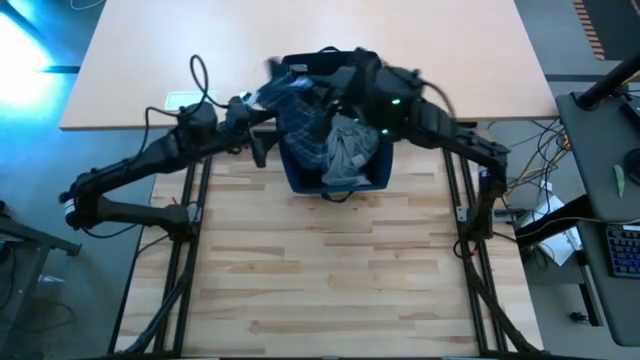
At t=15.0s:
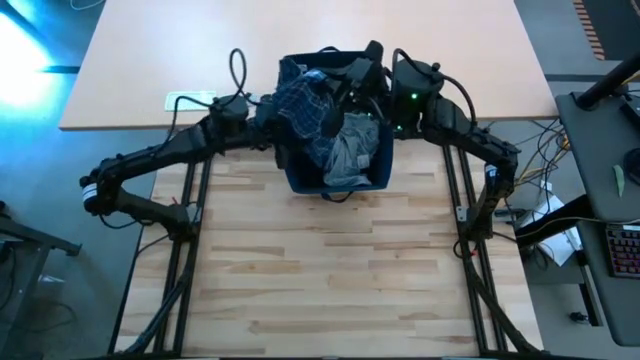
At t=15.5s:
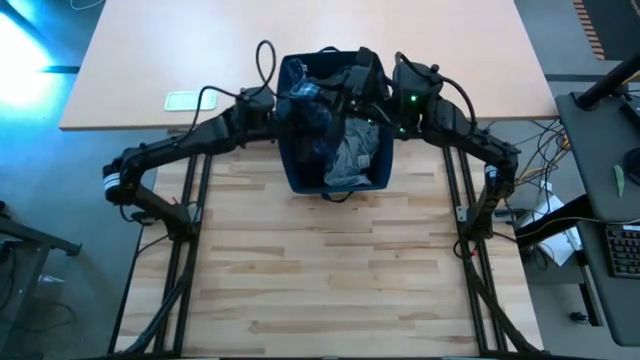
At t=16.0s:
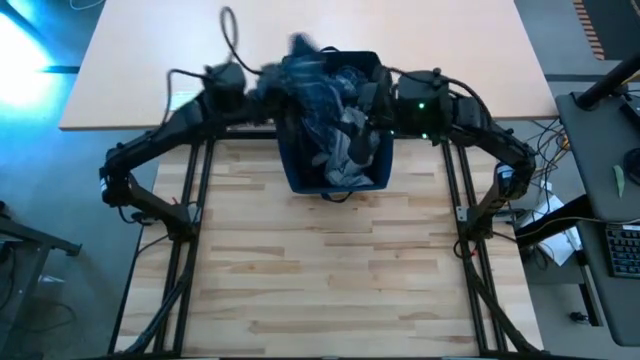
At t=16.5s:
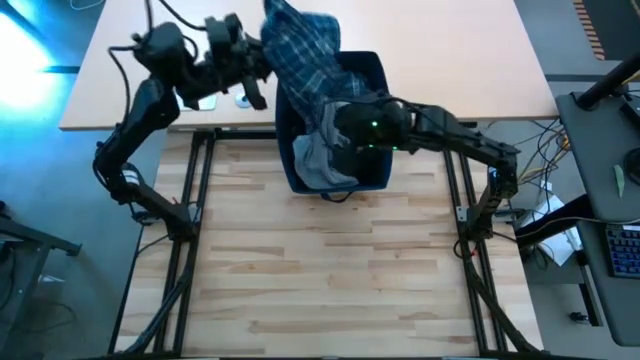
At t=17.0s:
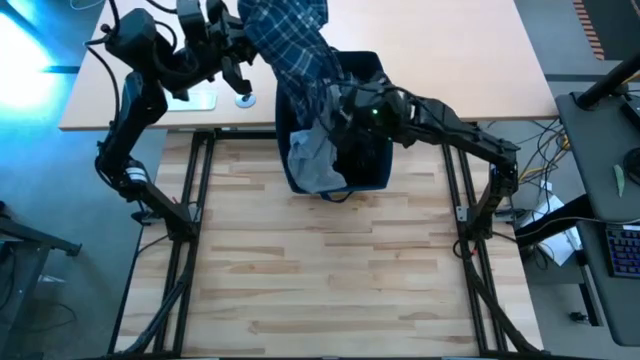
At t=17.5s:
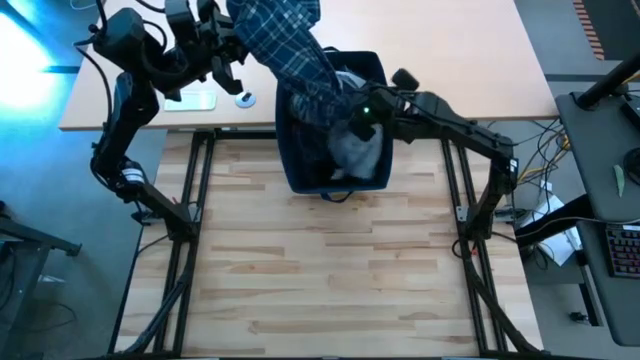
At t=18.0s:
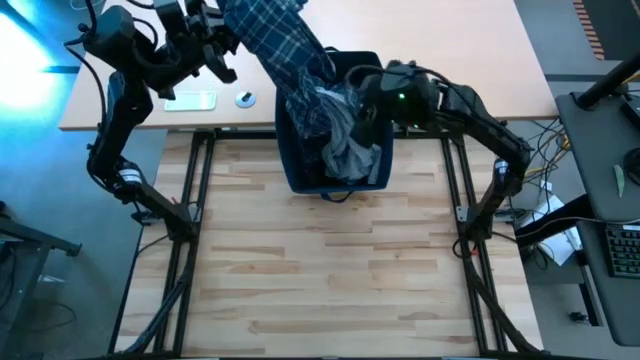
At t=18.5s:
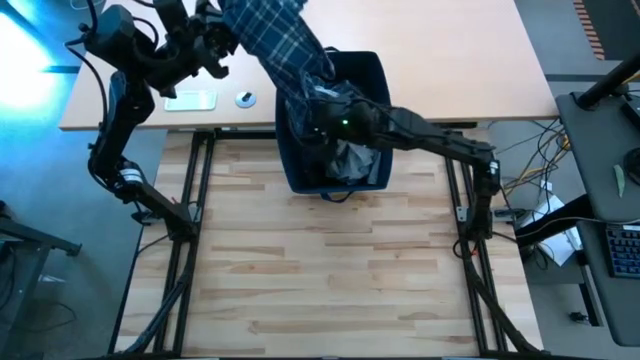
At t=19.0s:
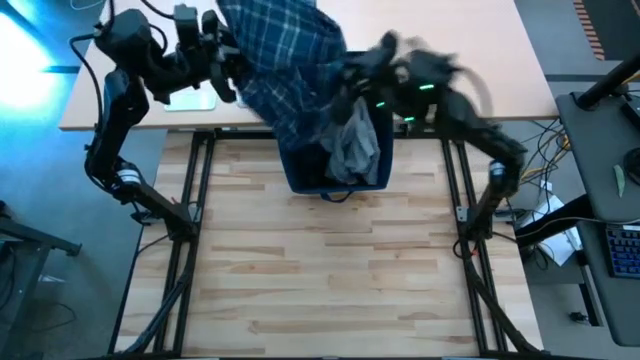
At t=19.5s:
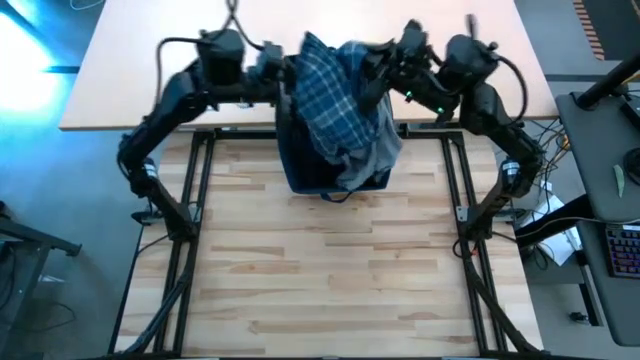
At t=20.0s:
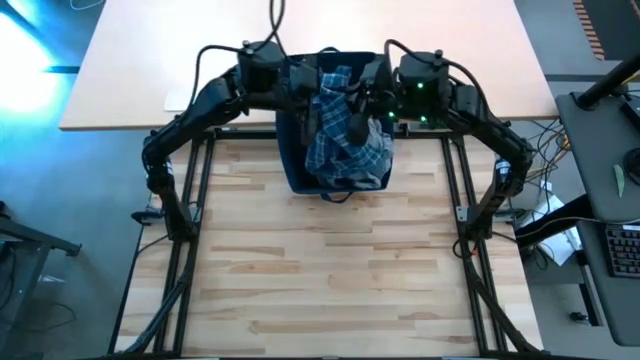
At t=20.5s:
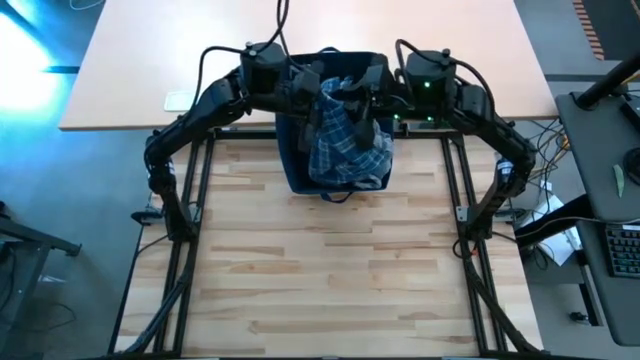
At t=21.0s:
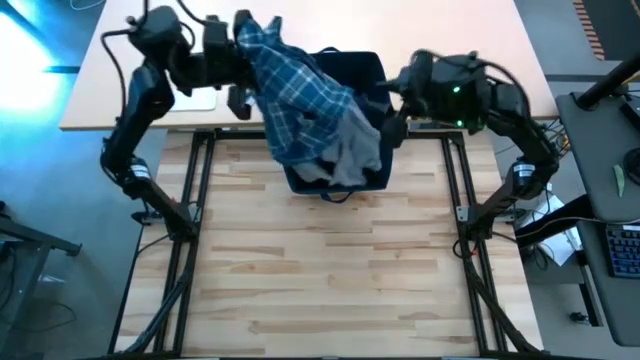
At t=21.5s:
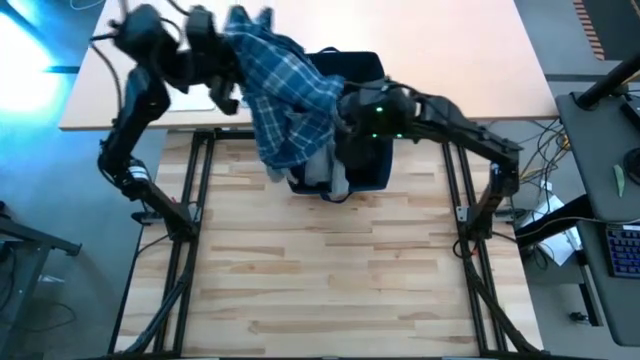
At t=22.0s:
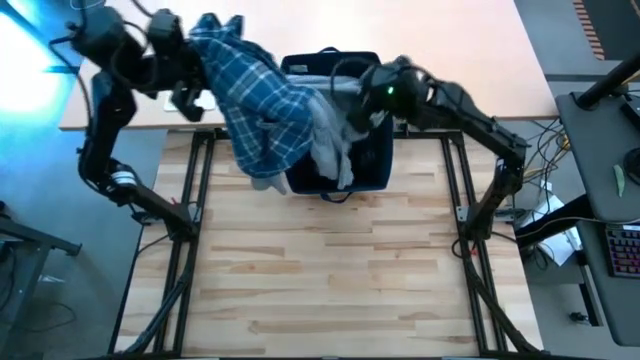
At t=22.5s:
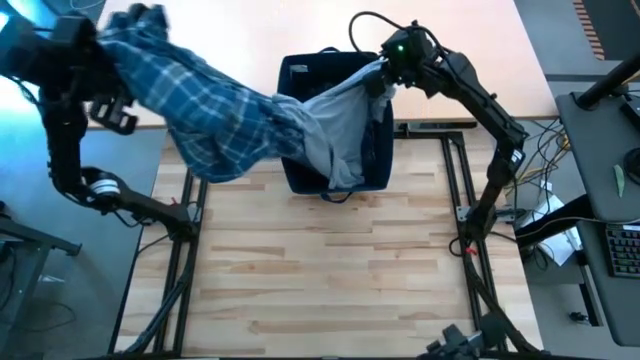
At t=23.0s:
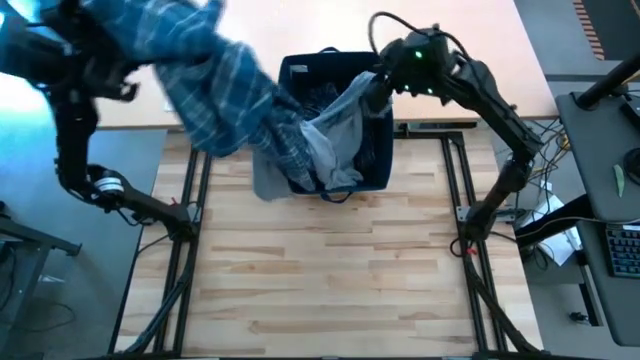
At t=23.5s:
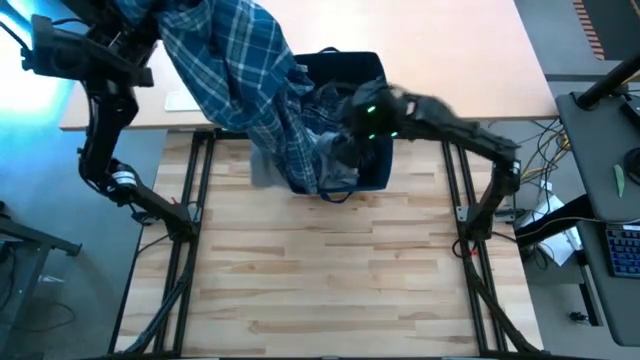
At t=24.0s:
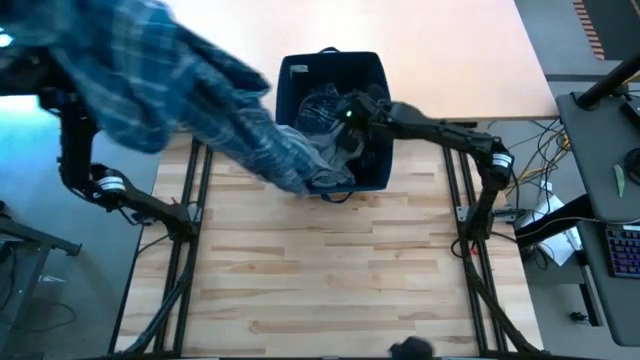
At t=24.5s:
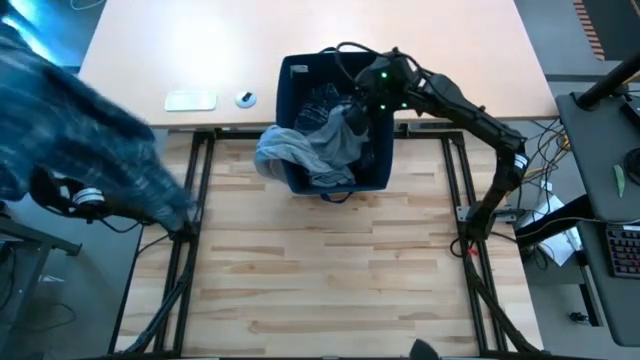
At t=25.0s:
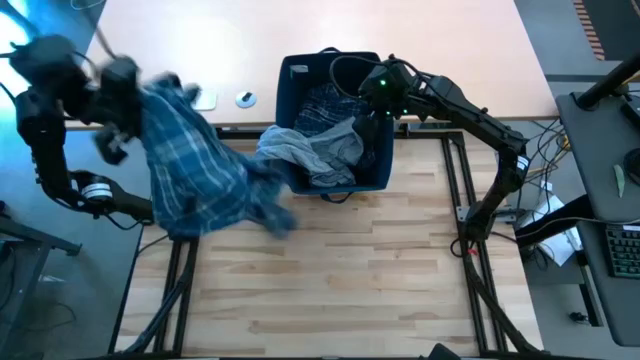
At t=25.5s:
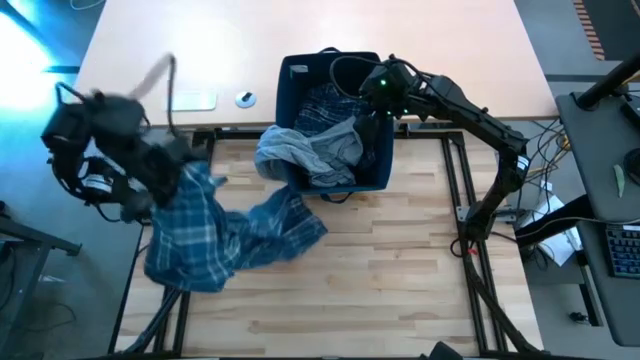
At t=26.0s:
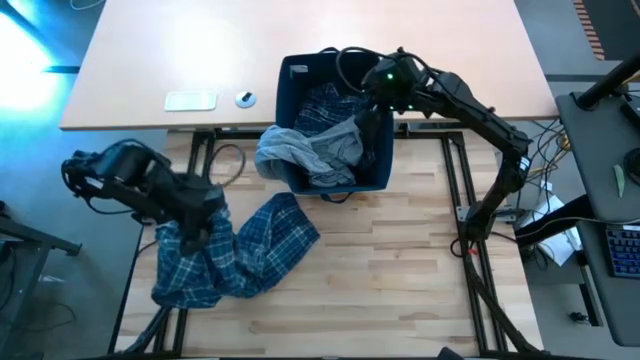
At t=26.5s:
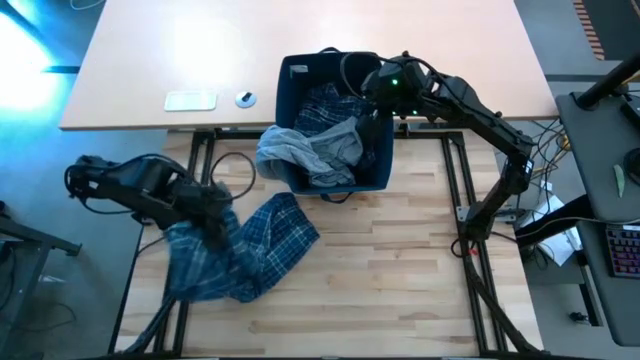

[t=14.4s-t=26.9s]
Task: Fold Laundry from Bin
Remove the blue patterned pants from the blue laundry bin

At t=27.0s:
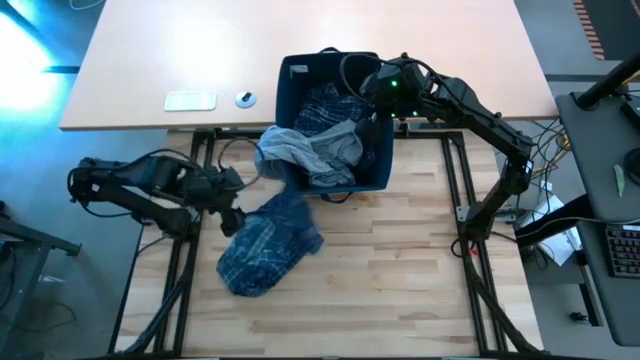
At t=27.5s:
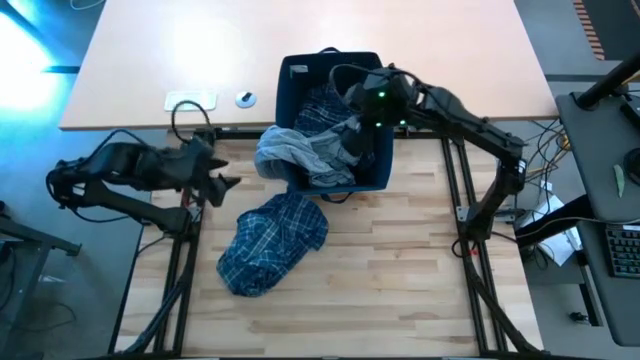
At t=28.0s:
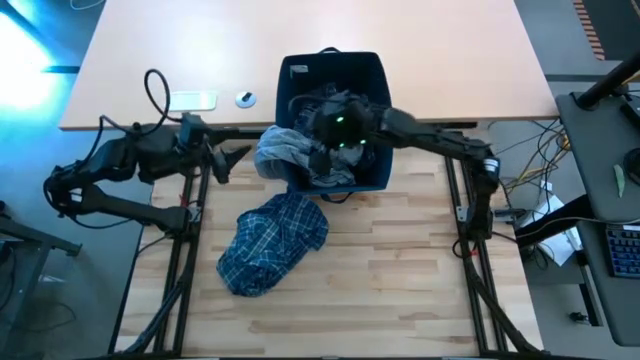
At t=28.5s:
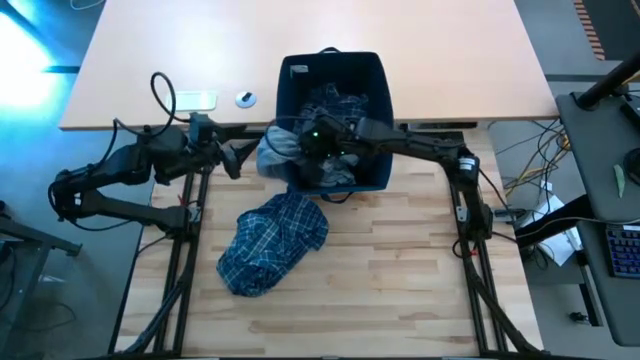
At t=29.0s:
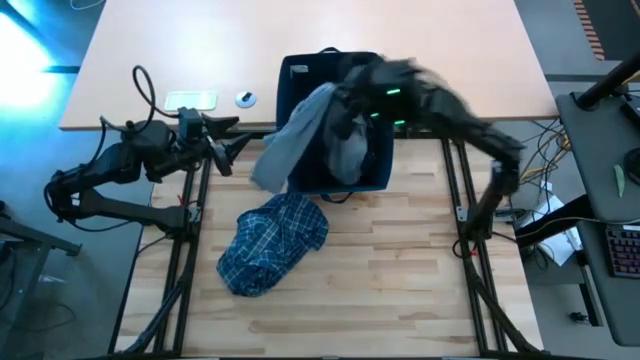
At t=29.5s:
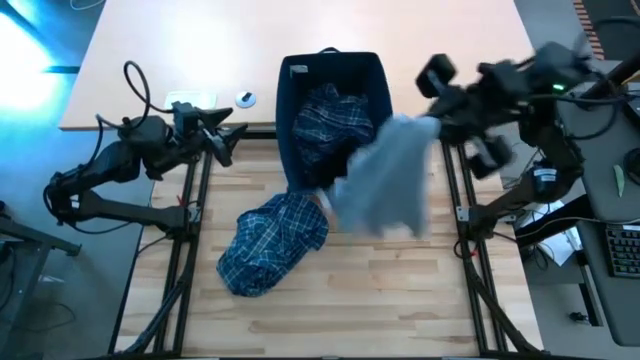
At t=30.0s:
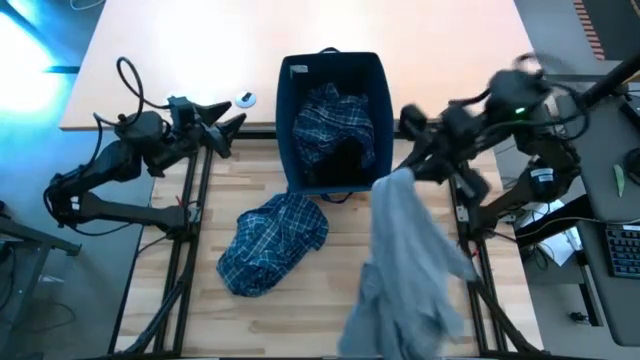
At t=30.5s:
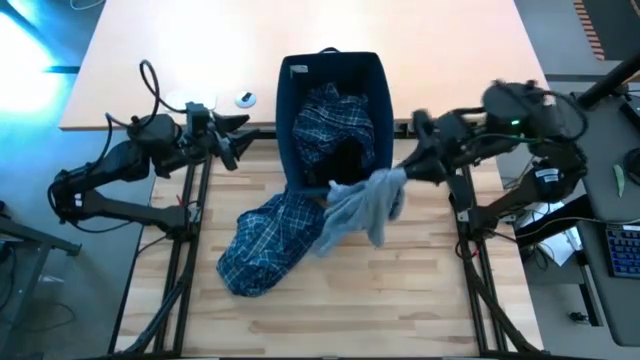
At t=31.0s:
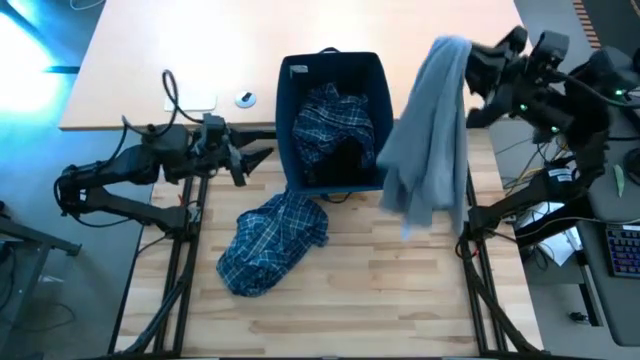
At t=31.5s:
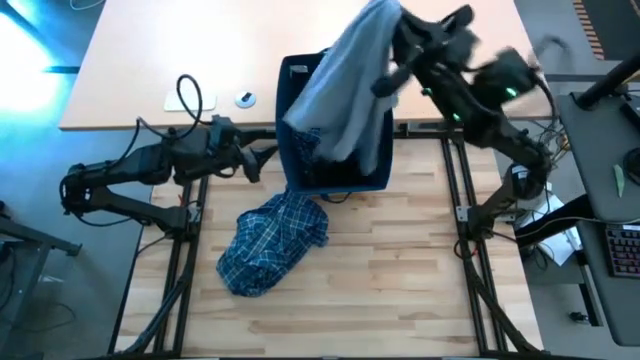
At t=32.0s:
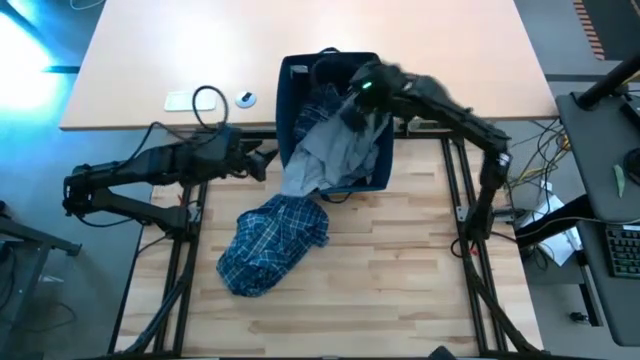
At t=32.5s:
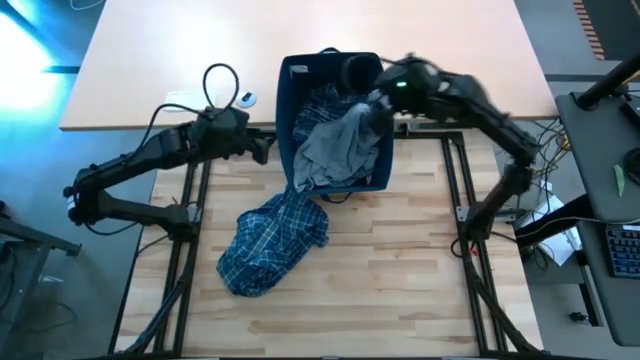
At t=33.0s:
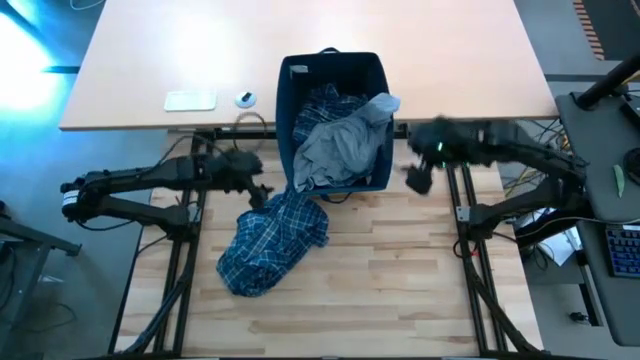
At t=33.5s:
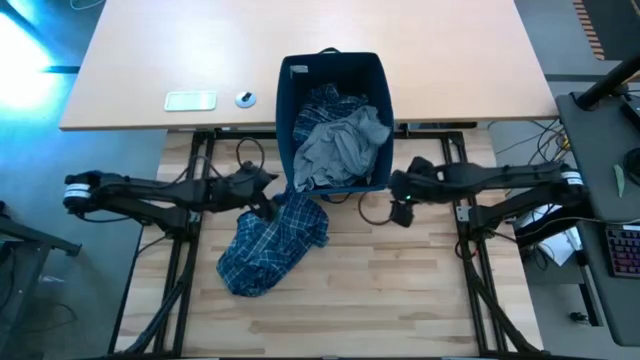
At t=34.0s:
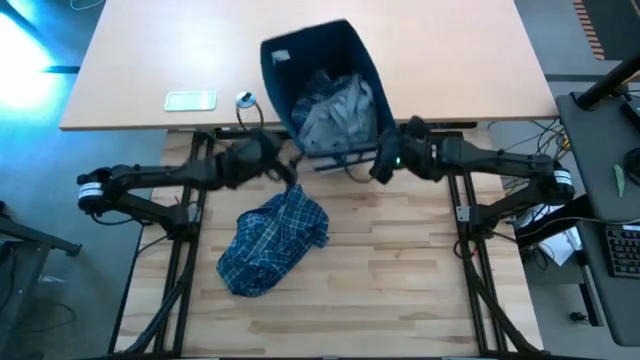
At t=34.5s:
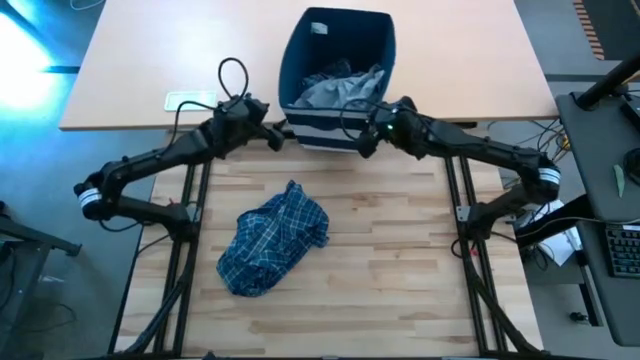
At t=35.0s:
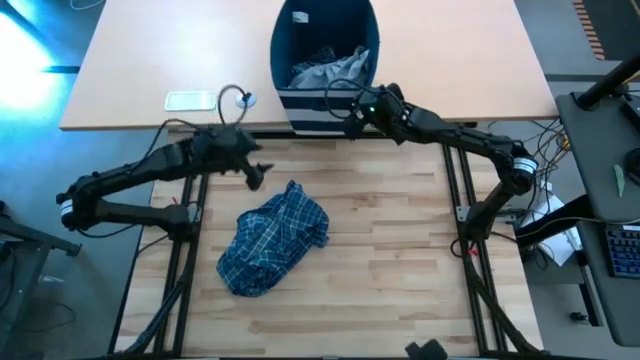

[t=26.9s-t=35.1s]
Adjust the grey shirt on the blue laundry bin
